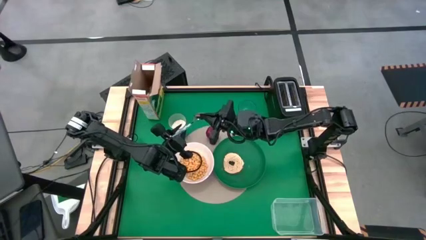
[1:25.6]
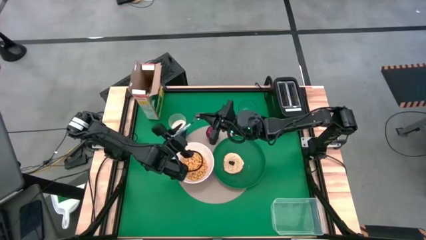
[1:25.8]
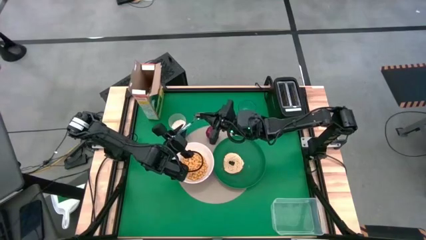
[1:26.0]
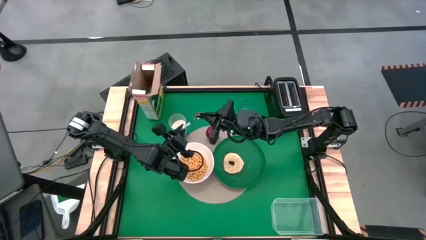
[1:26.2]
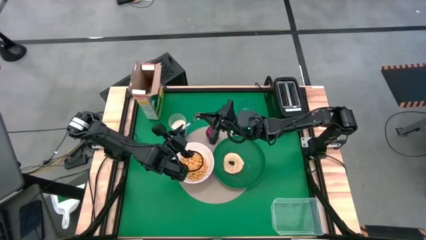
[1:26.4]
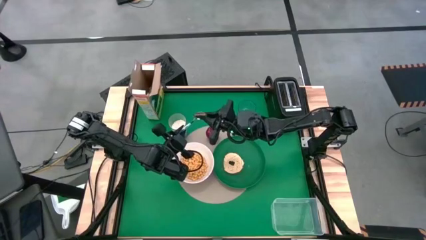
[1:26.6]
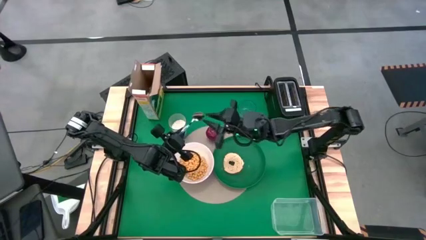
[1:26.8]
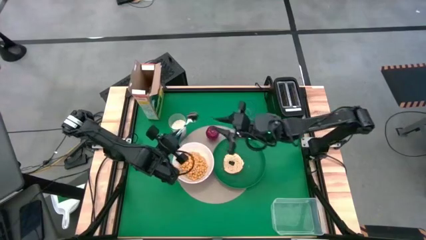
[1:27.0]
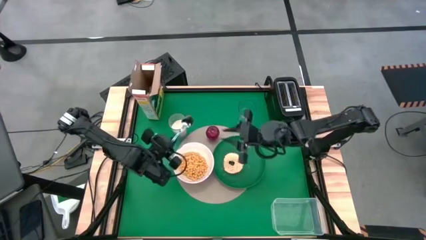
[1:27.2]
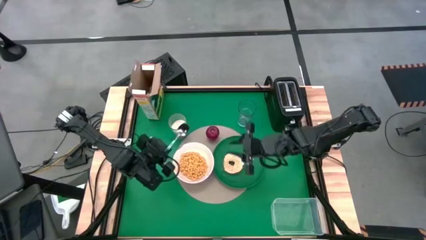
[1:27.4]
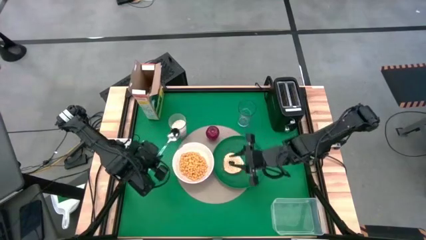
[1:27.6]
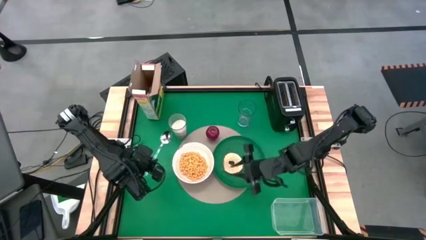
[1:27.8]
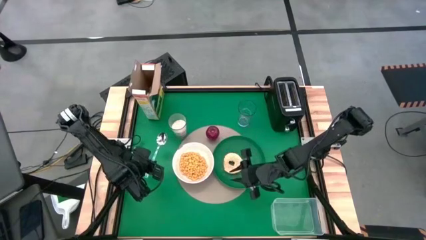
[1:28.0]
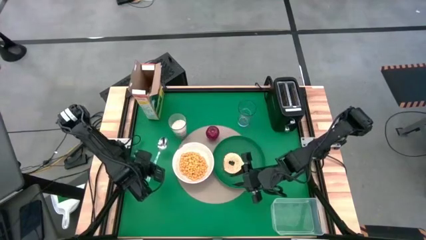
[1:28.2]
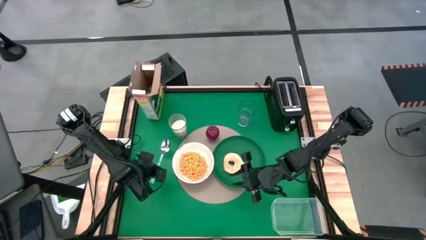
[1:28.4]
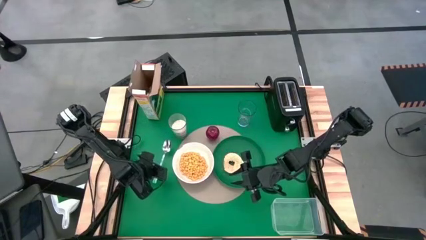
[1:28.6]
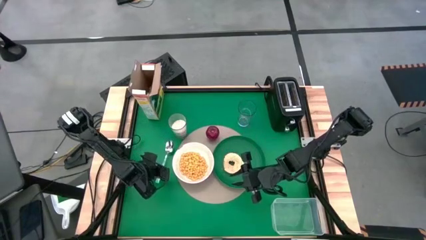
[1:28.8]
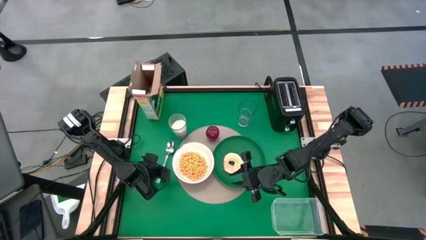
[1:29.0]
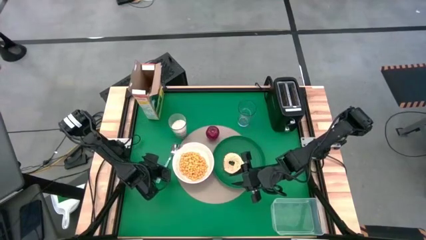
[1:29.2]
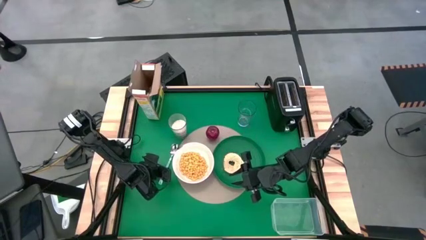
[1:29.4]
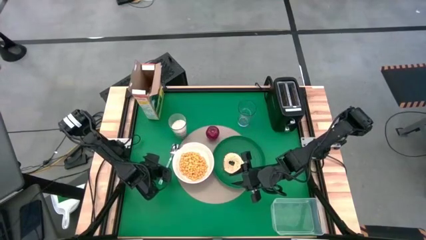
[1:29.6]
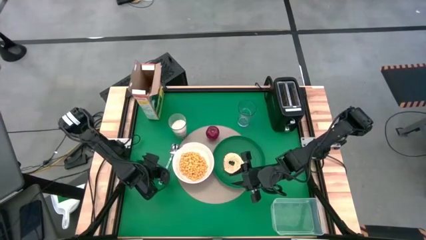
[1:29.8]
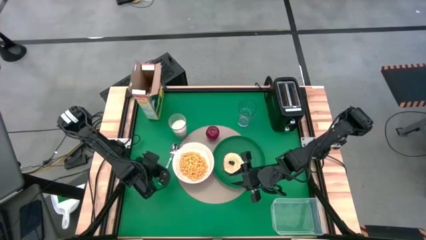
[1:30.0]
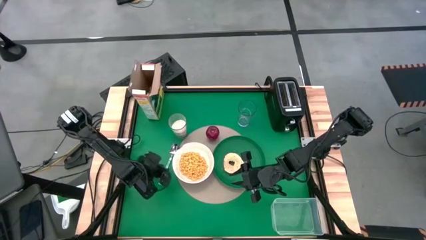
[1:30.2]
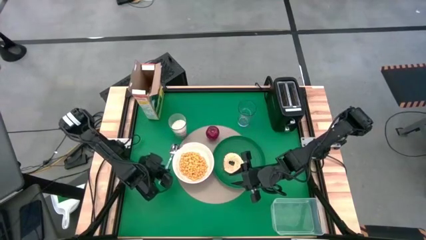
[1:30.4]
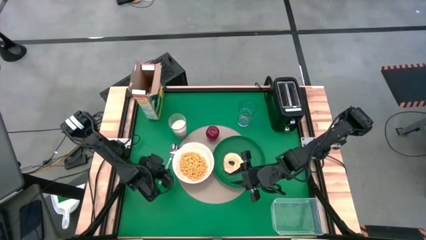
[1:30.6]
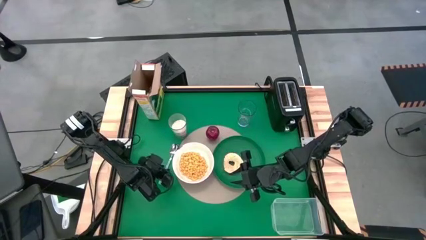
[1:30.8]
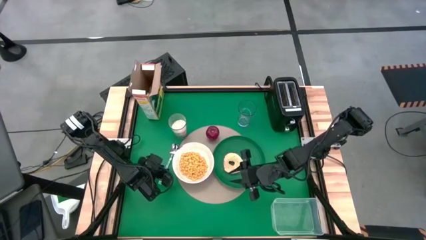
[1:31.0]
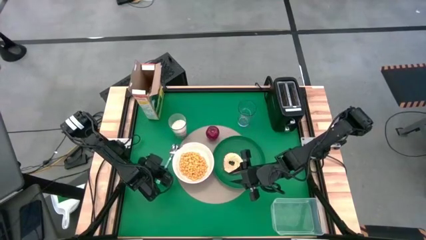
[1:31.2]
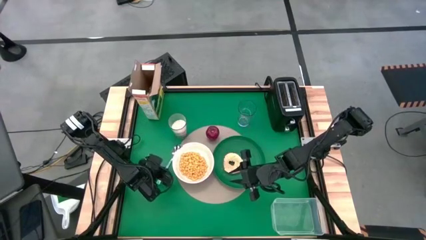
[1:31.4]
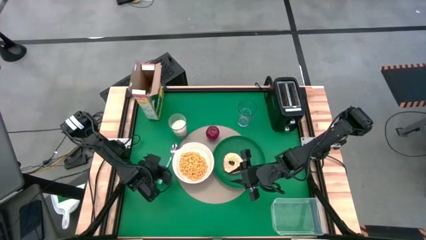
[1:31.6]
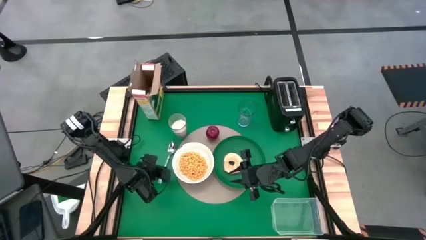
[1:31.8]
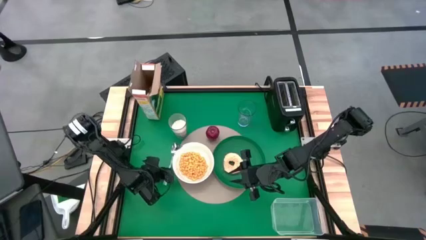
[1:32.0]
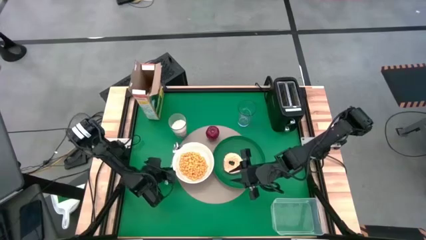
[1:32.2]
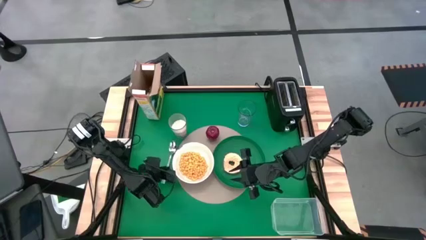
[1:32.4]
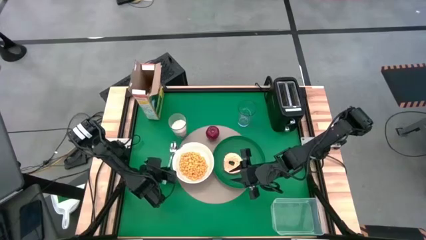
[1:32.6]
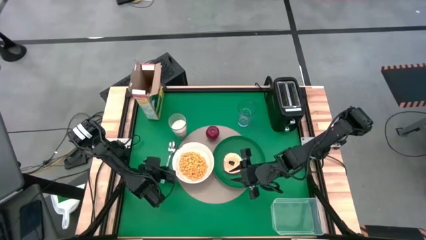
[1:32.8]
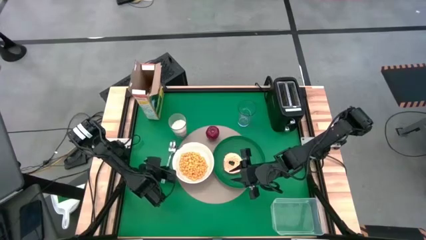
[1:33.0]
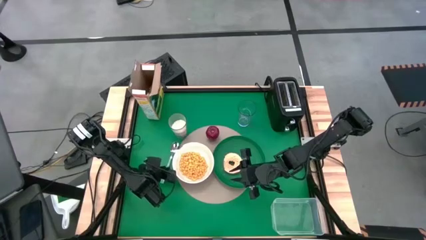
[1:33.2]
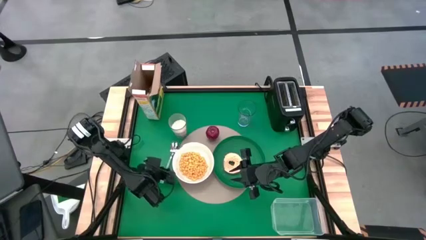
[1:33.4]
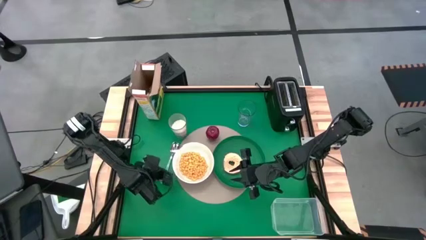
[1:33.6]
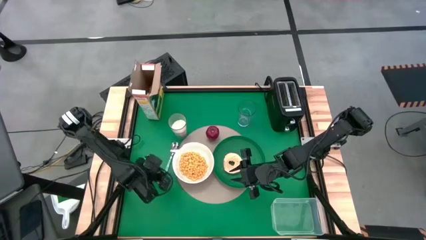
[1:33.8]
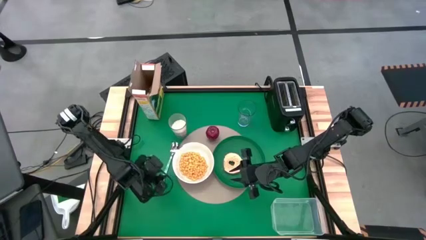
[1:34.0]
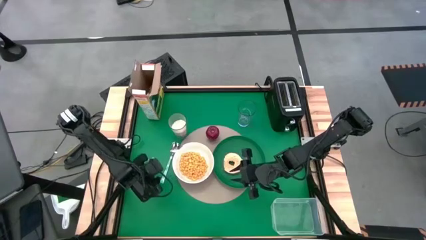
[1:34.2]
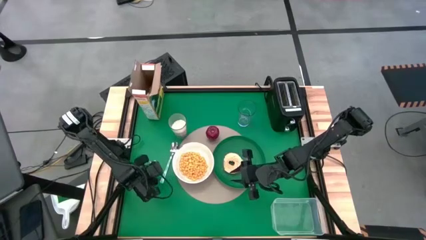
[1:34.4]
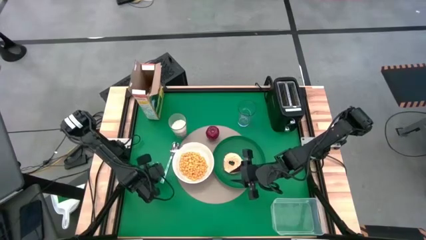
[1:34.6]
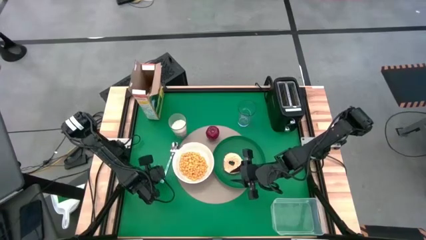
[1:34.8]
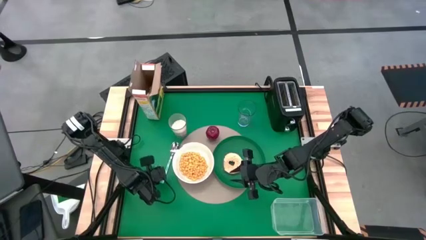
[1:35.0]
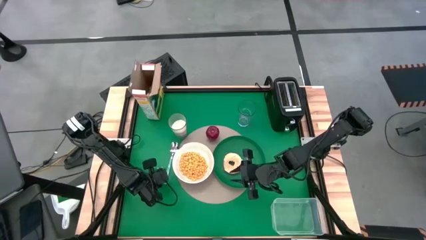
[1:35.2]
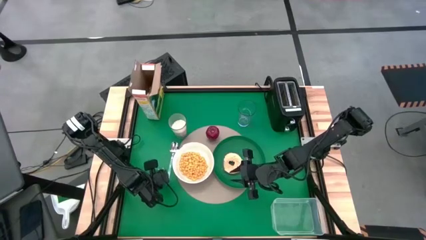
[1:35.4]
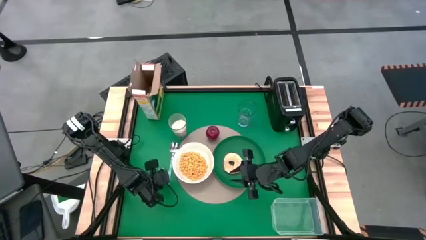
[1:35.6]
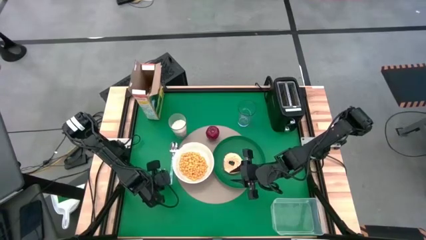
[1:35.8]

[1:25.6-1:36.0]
Task: Arrange a breakfast setting
Put the spoon on the table mat to the right of the bowl

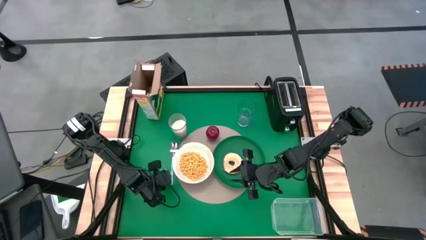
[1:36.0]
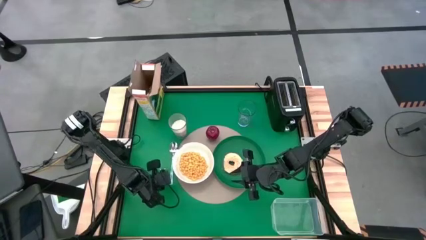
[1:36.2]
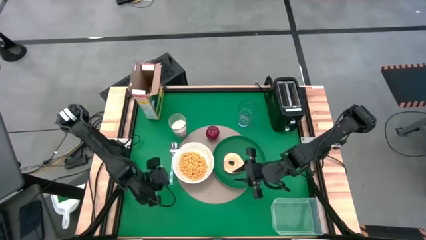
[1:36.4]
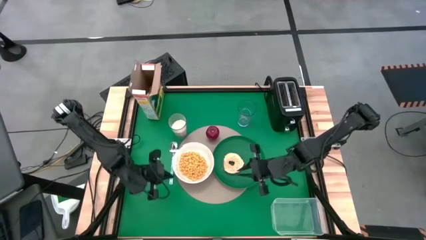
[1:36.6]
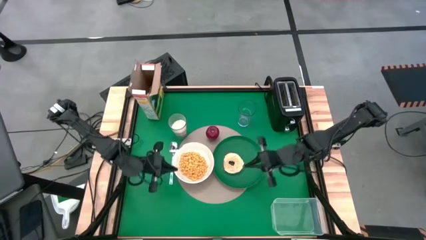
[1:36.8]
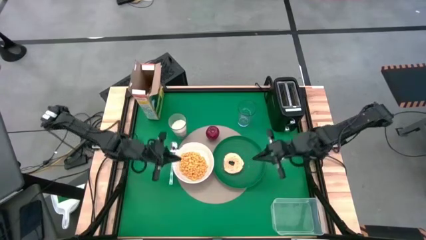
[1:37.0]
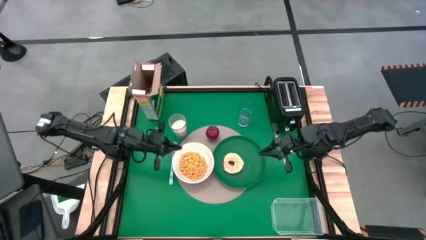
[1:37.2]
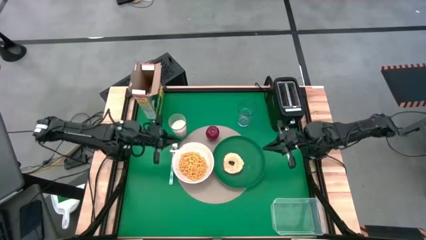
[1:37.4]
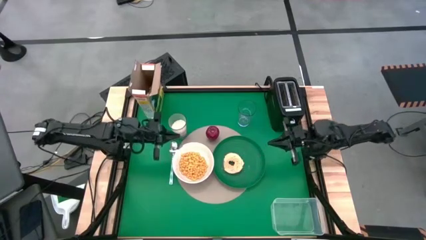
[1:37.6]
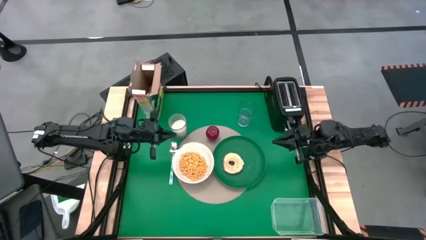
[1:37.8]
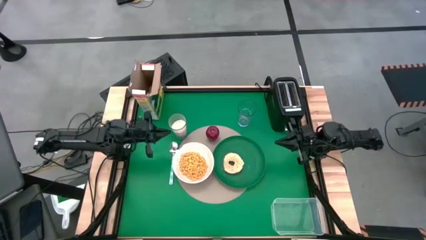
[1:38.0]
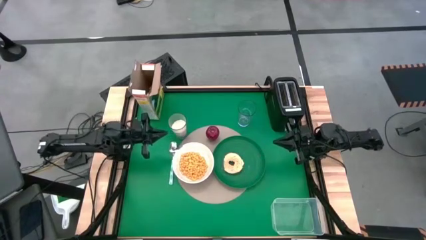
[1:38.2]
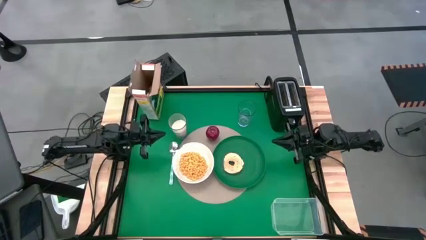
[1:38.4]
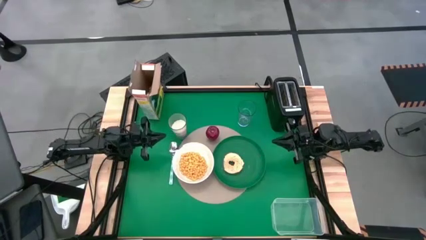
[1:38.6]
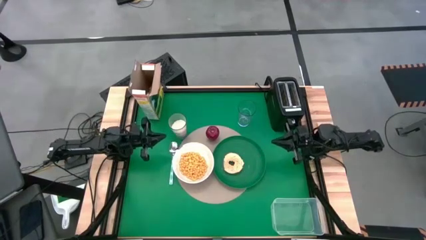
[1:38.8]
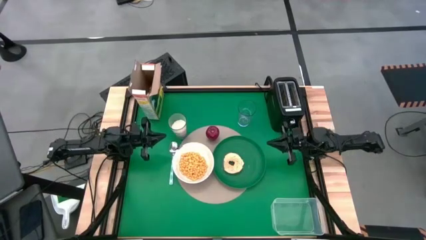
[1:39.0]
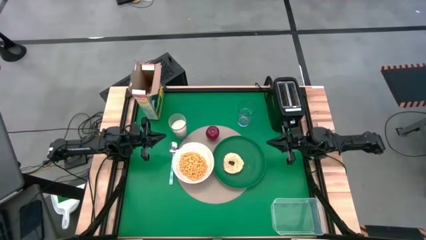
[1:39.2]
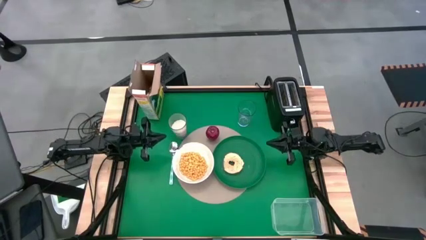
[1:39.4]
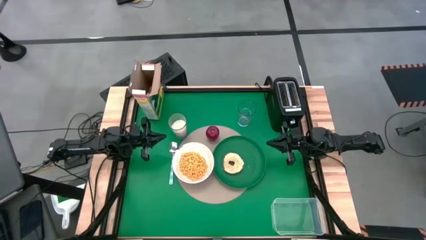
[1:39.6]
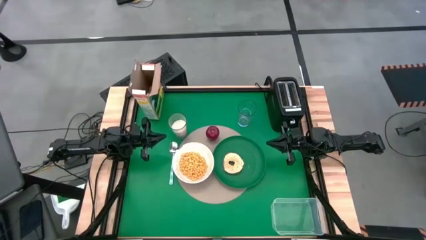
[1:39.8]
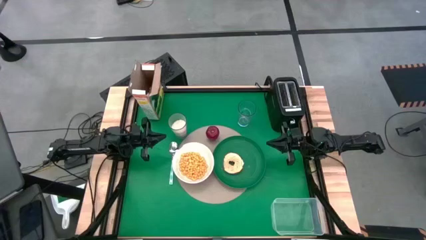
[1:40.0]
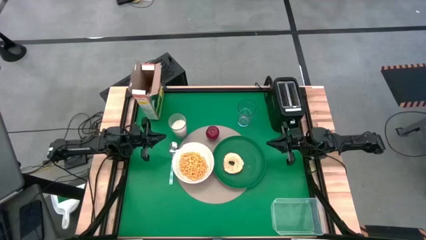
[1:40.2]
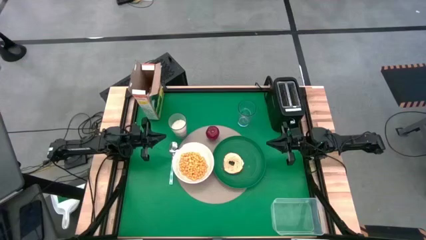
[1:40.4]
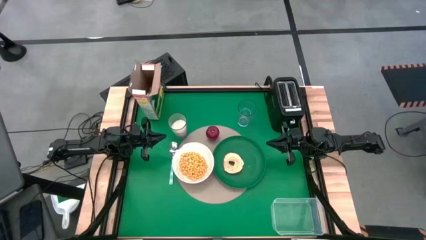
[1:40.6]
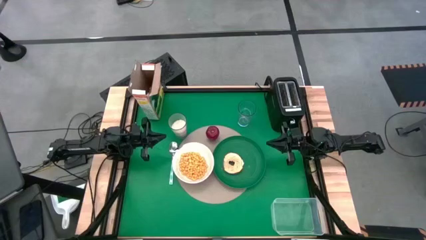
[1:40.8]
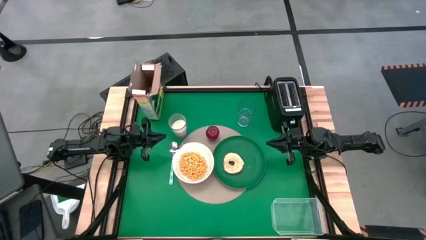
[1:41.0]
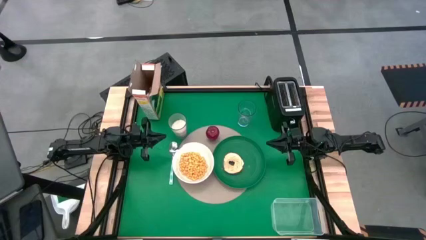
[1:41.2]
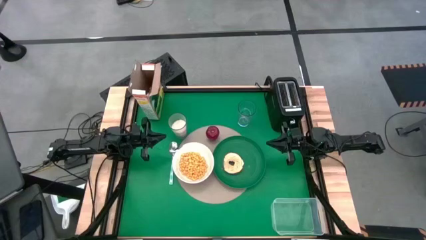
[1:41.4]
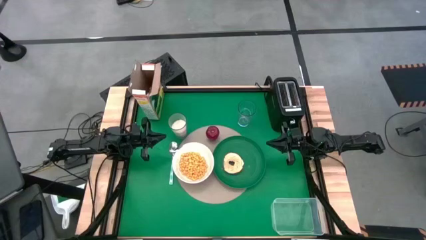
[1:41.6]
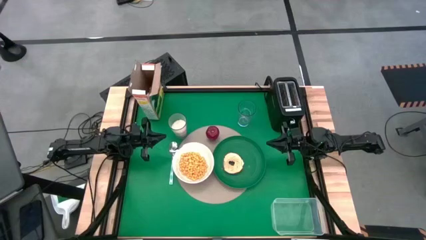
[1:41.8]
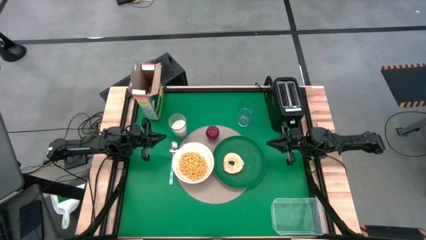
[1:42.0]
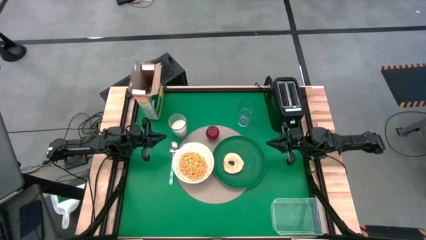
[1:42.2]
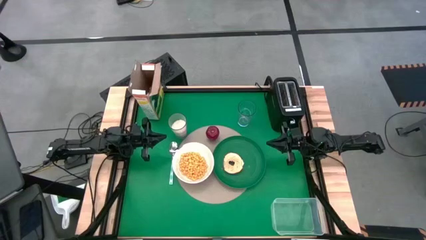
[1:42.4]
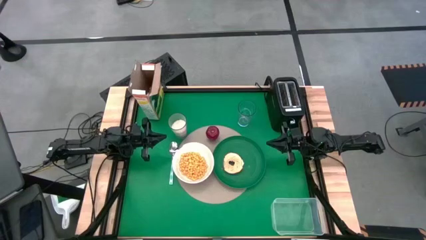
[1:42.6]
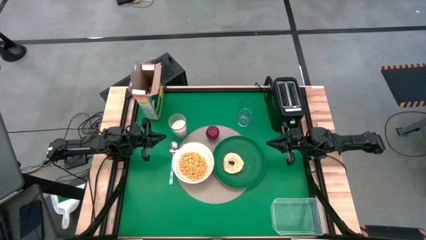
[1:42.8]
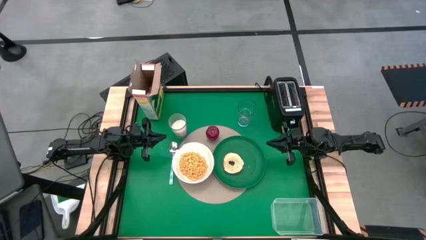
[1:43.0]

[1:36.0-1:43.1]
Return to Home Position
